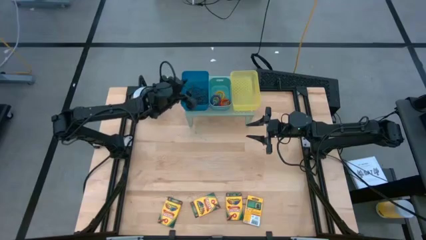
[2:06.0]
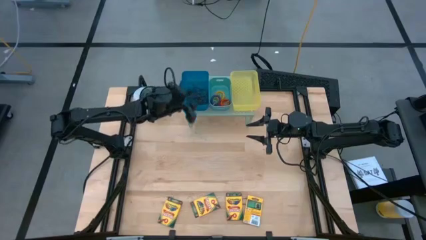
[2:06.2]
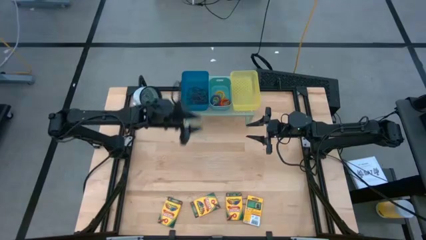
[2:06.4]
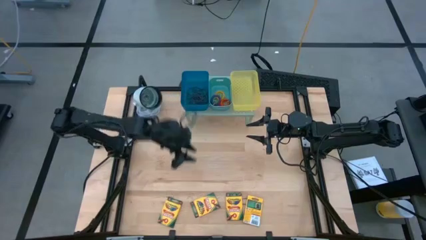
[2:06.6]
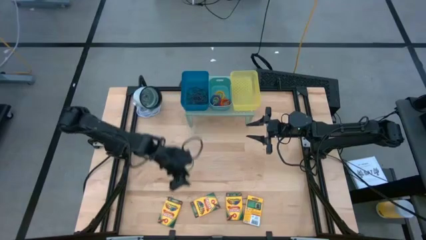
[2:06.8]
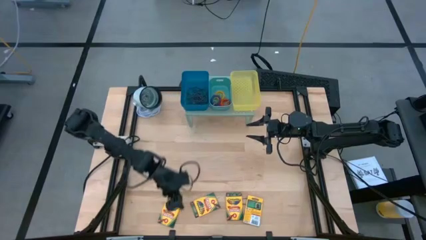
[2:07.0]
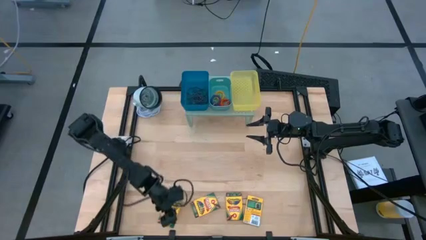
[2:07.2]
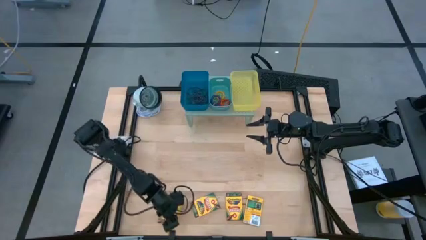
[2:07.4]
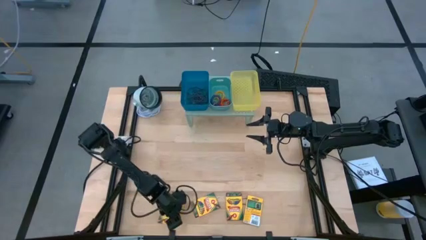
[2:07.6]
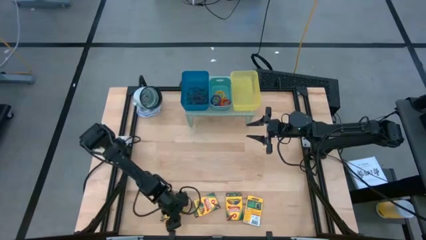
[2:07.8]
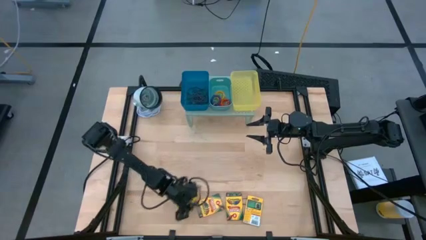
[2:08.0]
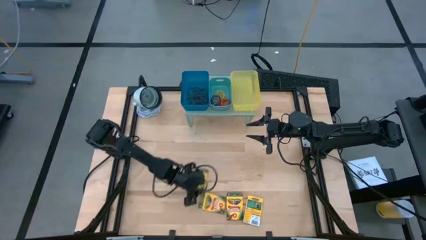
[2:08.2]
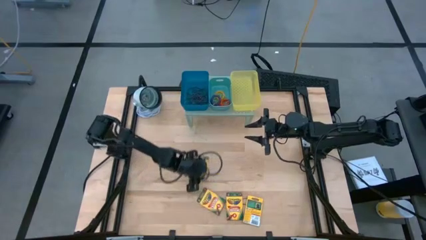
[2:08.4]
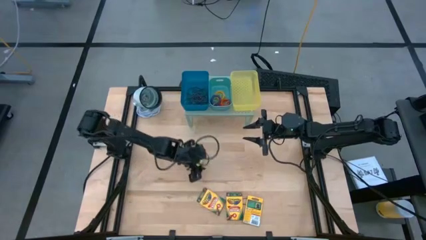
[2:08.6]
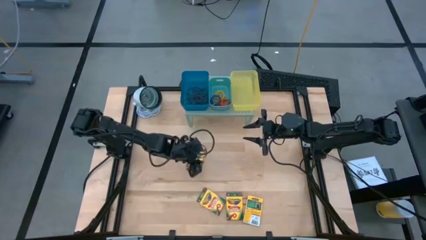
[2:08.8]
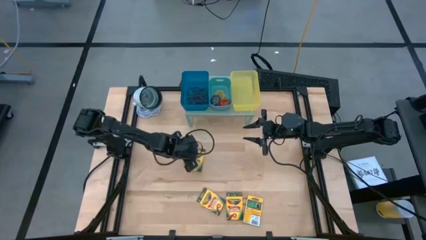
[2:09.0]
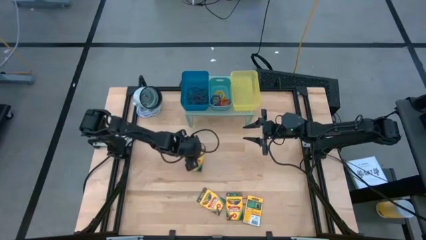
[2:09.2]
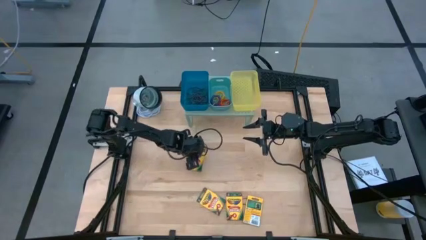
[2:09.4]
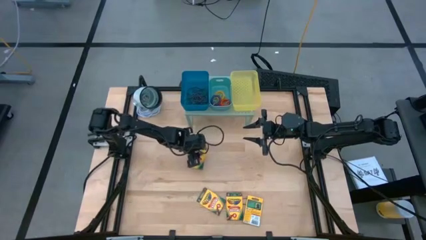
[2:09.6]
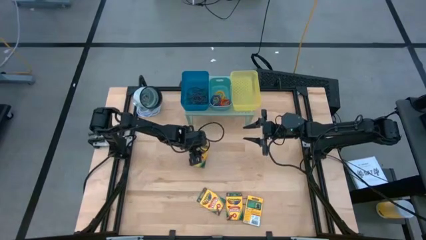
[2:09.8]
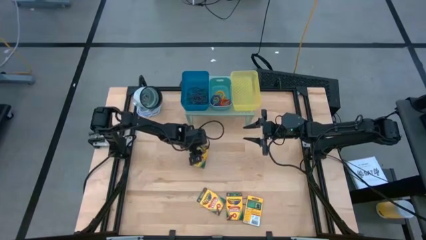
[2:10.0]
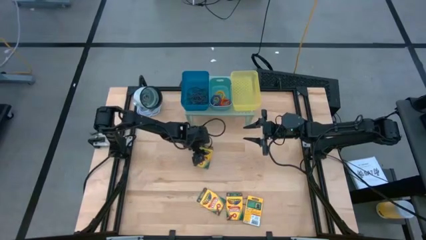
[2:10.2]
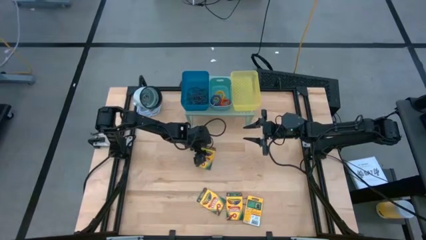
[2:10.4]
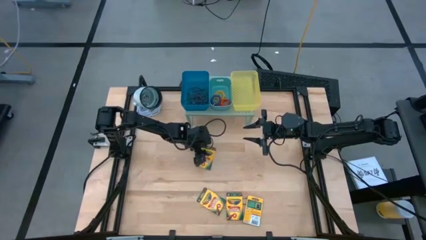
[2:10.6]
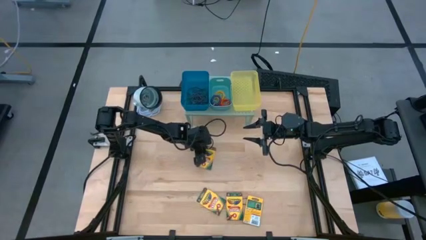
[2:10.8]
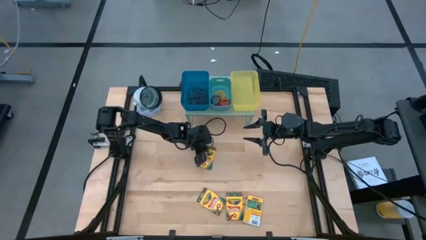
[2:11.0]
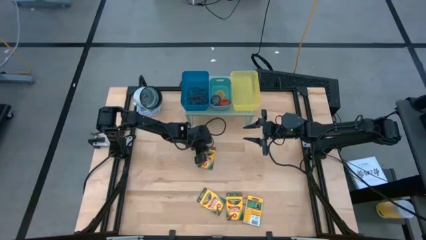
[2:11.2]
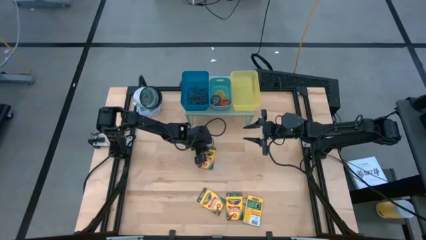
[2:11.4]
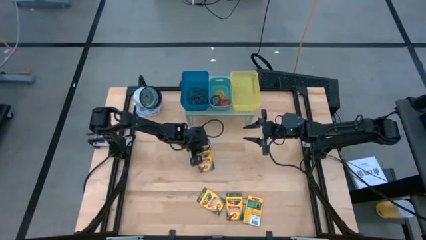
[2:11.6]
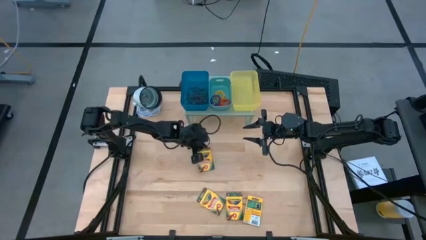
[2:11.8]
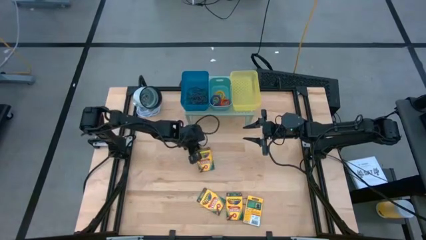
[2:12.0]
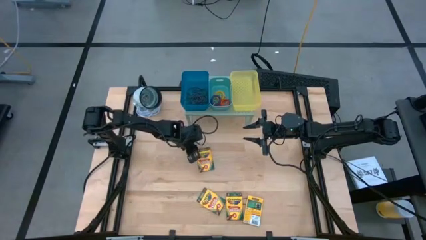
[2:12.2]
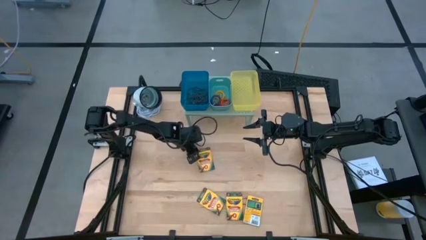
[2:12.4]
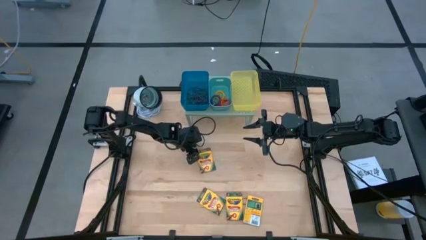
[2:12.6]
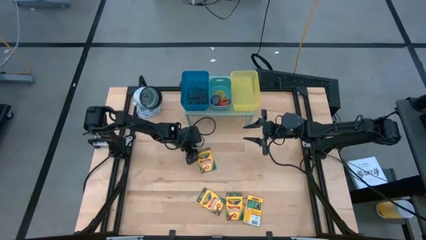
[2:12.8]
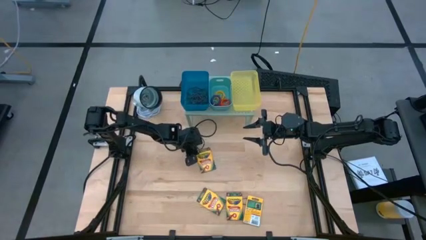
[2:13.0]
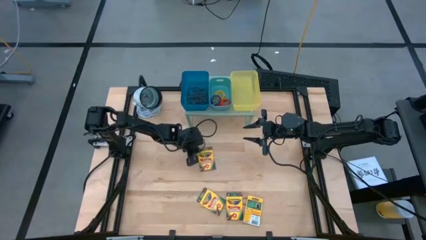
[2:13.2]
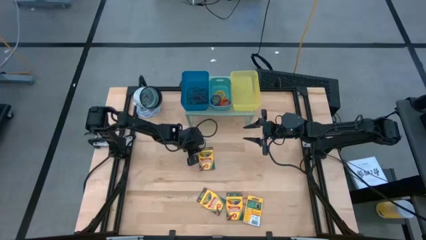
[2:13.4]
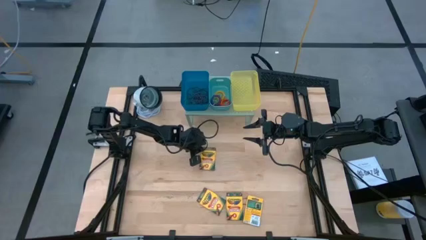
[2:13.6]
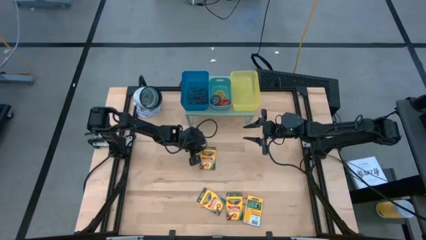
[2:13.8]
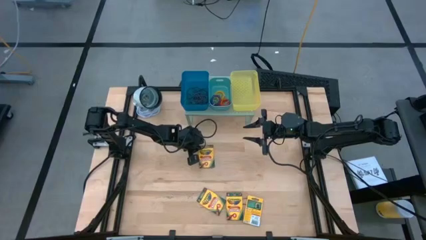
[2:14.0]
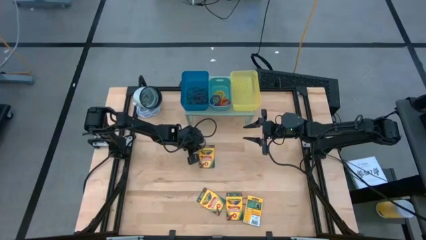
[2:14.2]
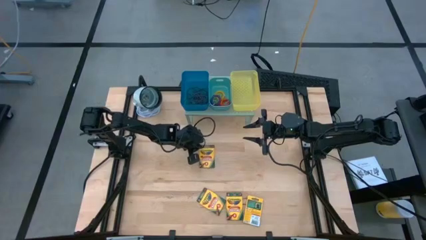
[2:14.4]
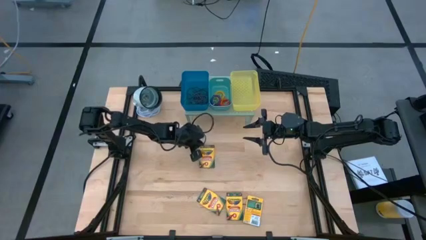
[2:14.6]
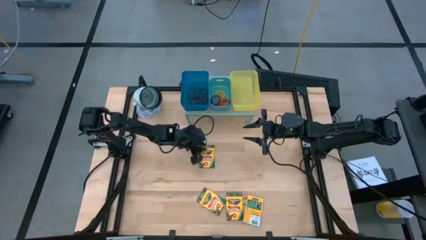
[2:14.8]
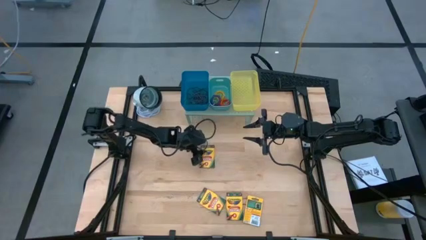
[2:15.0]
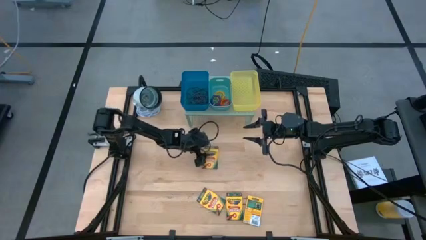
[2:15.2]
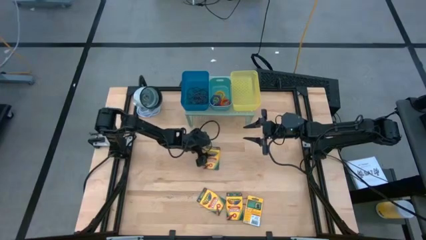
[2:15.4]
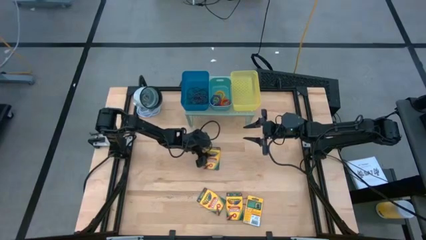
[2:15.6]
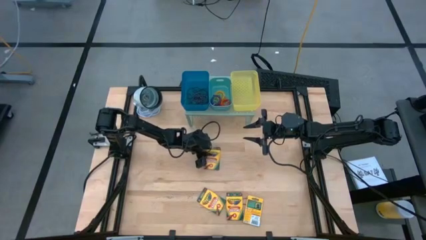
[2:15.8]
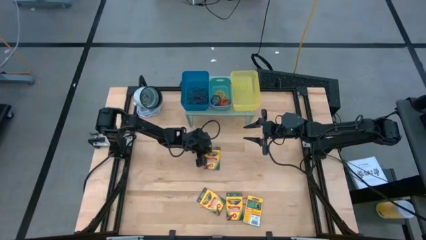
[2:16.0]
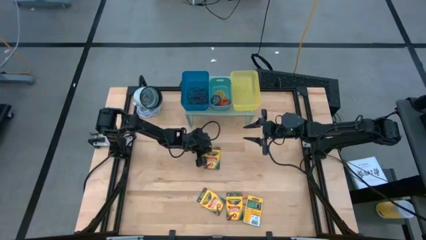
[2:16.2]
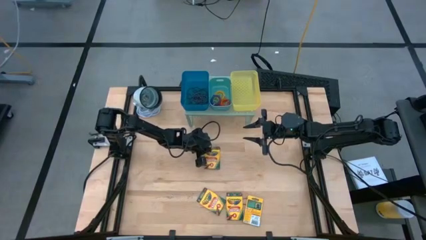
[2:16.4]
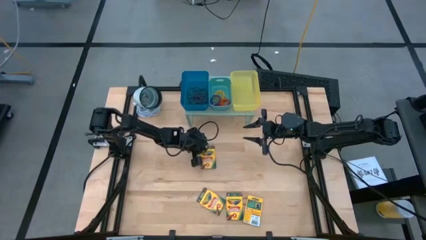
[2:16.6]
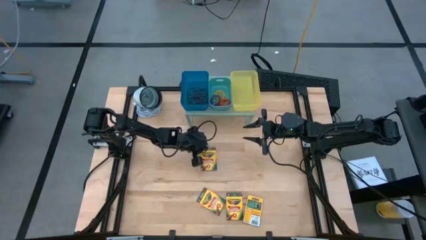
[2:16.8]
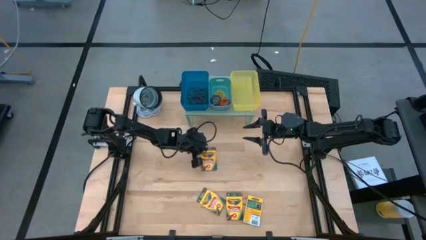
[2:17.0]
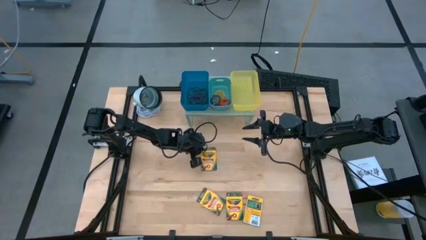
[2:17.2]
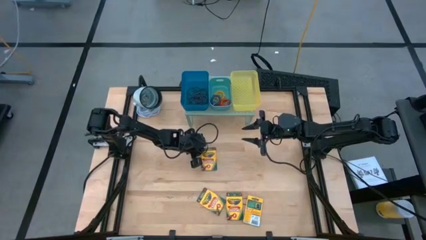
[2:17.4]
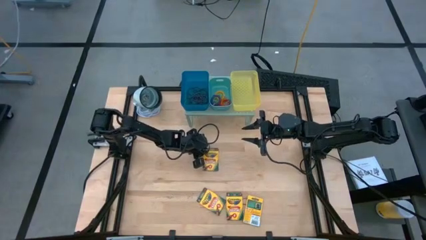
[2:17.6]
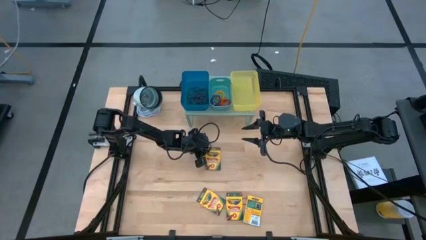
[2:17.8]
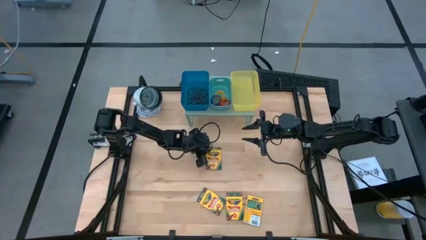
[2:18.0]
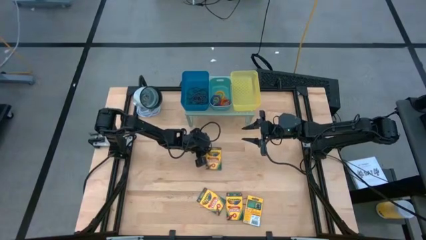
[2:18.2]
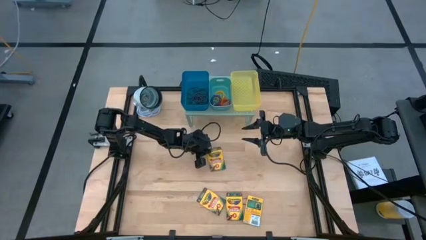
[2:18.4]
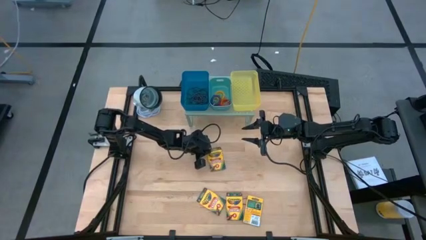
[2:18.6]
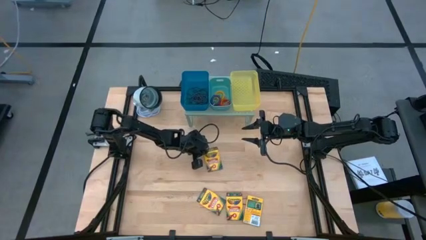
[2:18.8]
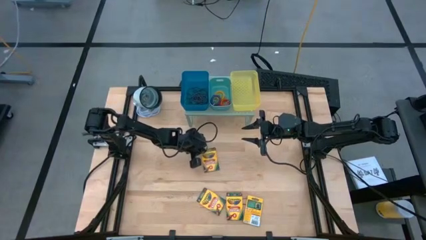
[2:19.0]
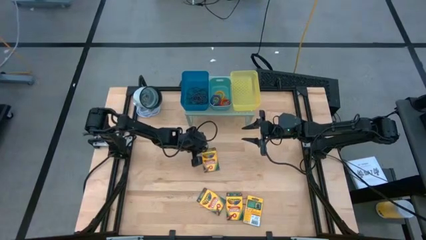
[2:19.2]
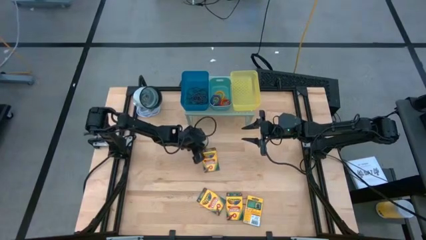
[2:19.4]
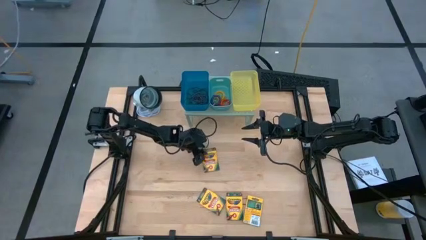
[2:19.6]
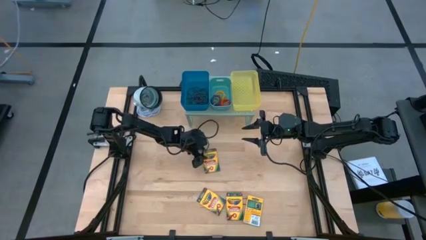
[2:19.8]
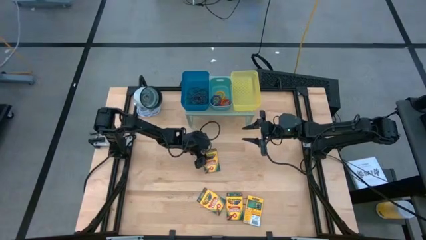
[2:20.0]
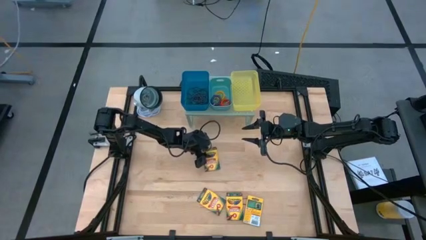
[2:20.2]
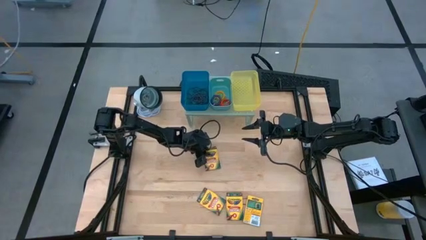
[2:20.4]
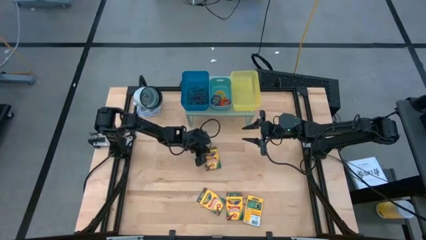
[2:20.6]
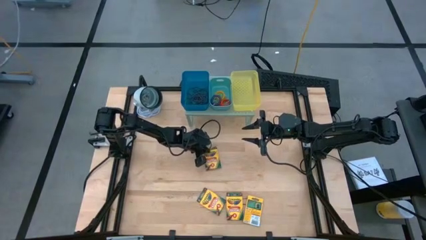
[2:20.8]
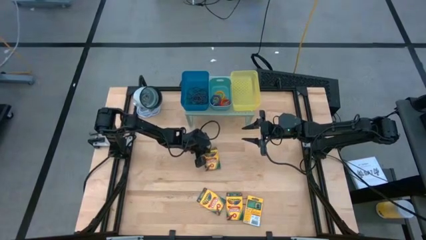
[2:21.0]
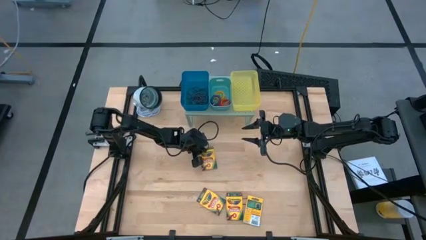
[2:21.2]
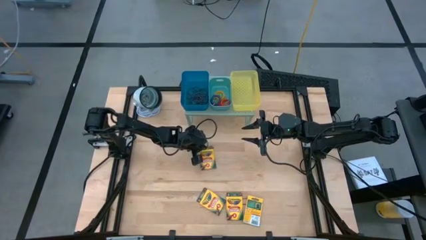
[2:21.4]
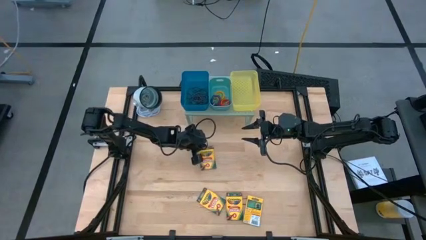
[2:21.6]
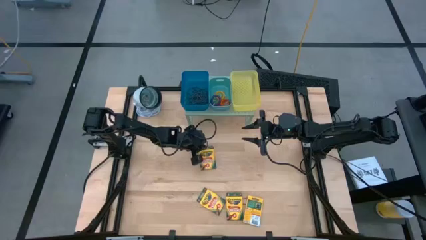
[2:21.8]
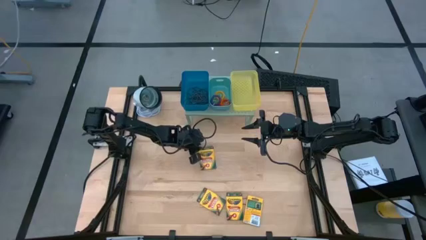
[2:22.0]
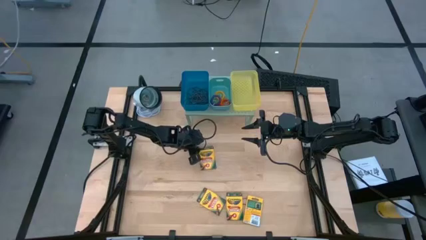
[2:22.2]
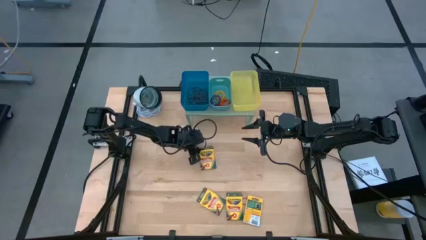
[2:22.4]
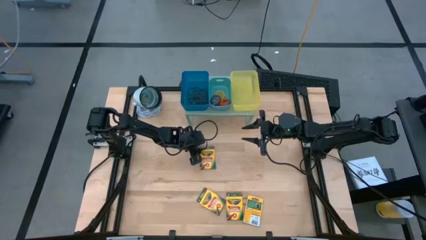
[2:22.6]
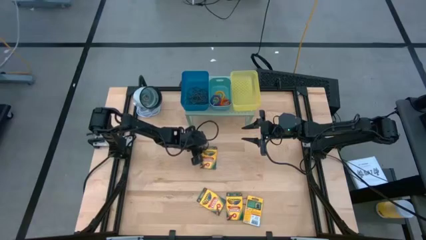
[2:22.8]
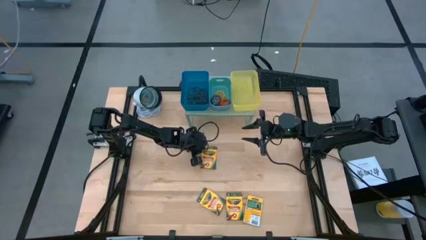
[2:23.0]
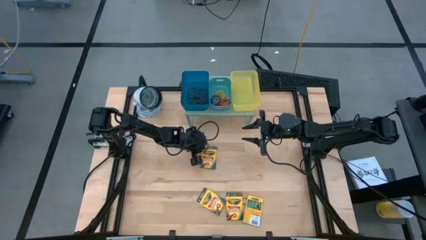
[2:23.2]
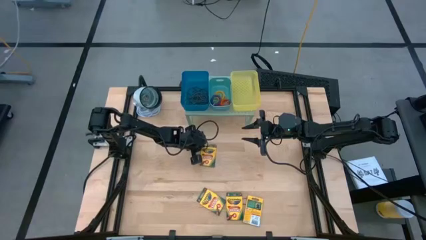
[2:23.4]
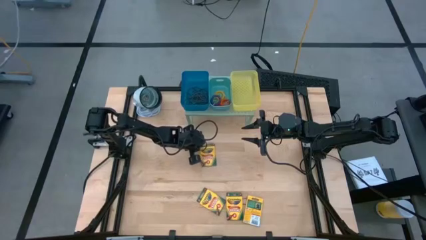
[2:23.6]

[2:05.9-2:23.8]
Task: Pick & Place Office Desk Supplies
Put the yellow crayon box into the yellow bin on the shelf
